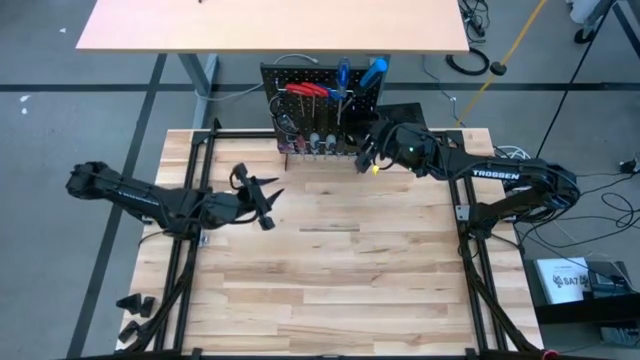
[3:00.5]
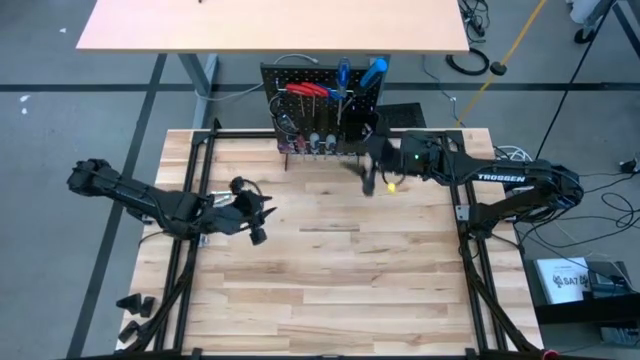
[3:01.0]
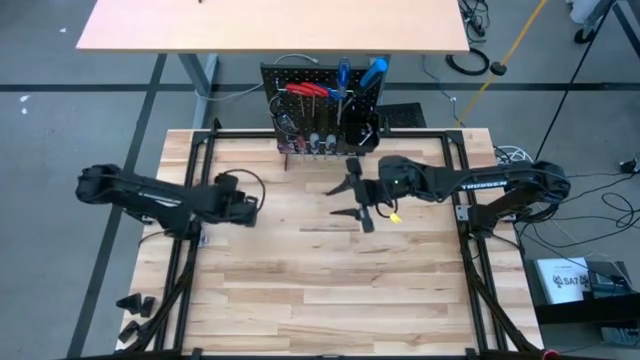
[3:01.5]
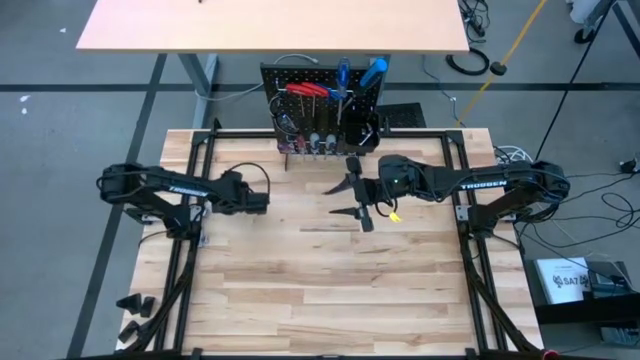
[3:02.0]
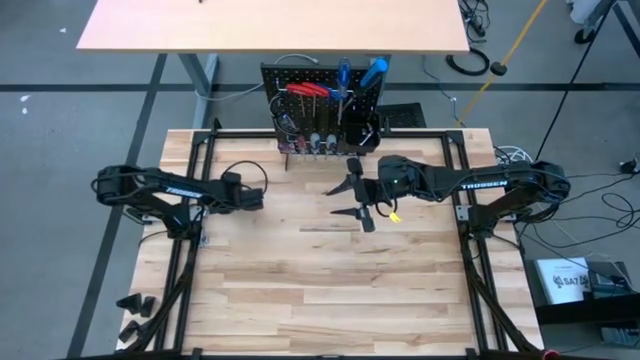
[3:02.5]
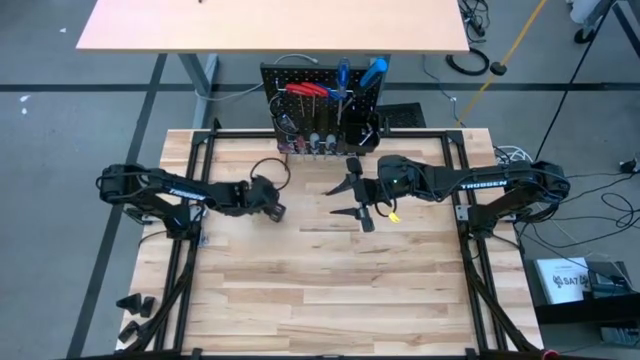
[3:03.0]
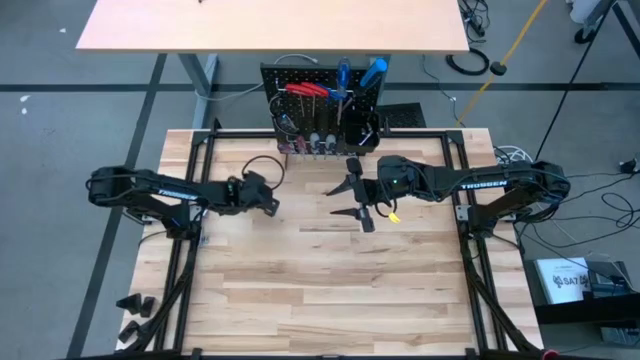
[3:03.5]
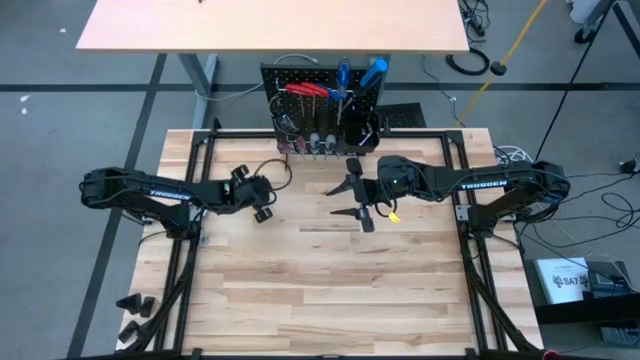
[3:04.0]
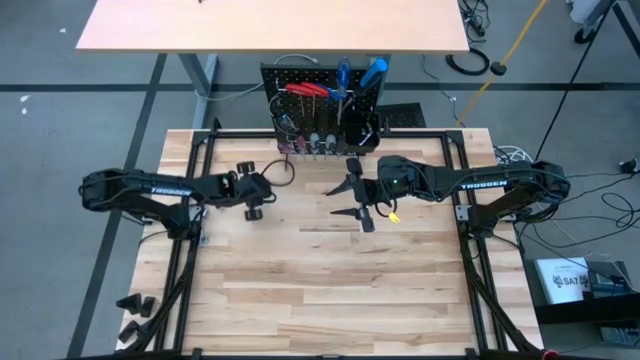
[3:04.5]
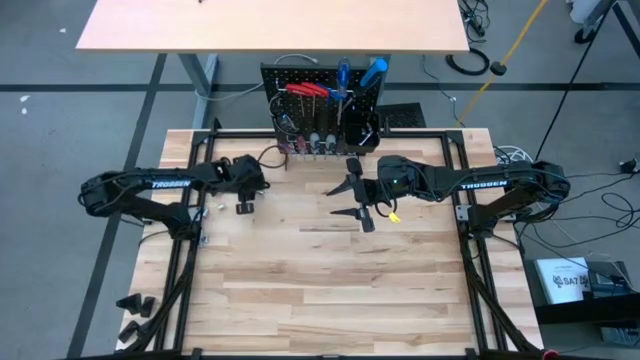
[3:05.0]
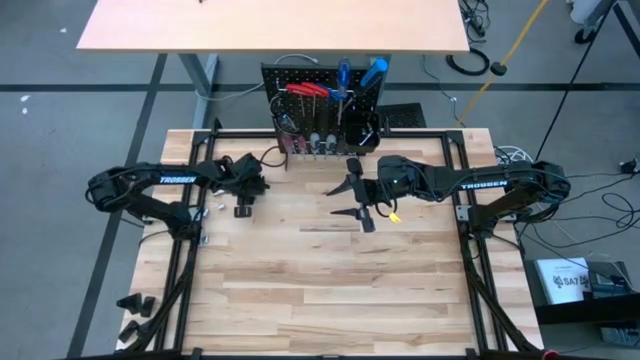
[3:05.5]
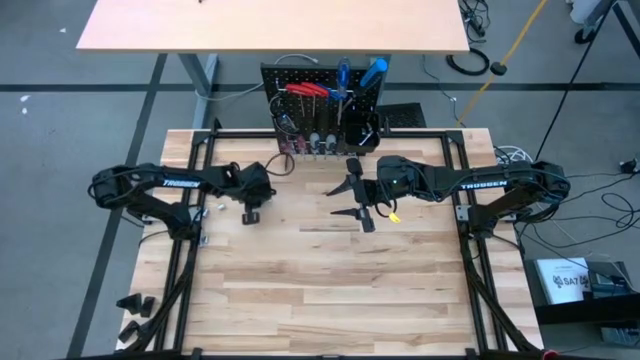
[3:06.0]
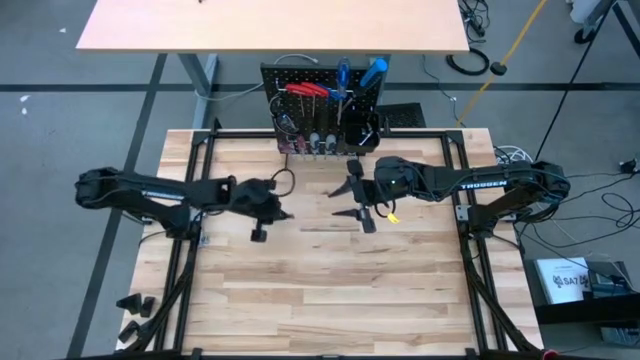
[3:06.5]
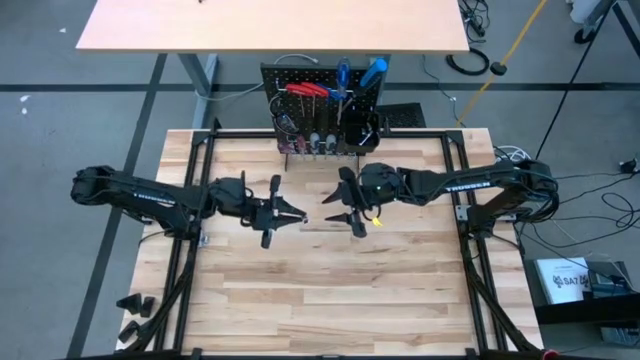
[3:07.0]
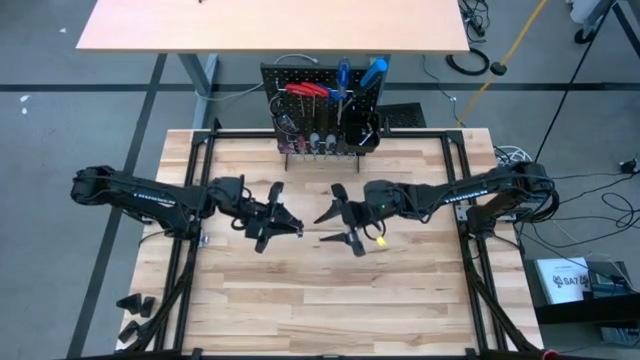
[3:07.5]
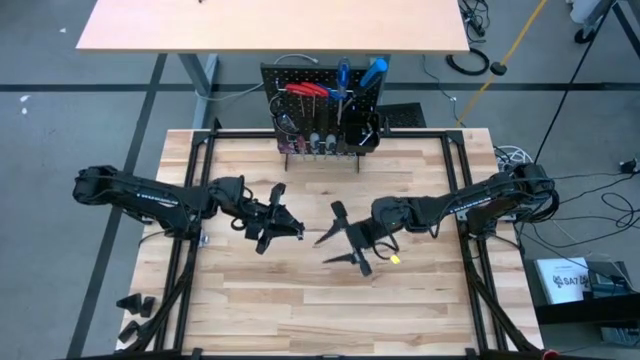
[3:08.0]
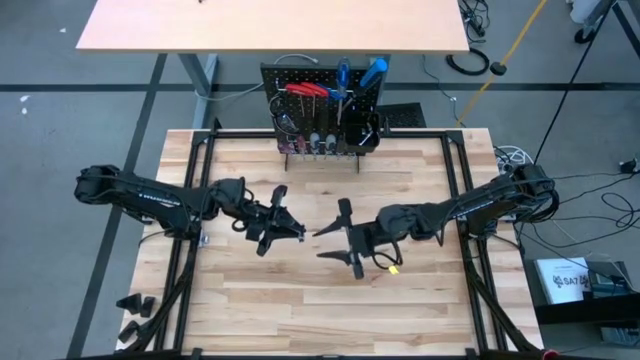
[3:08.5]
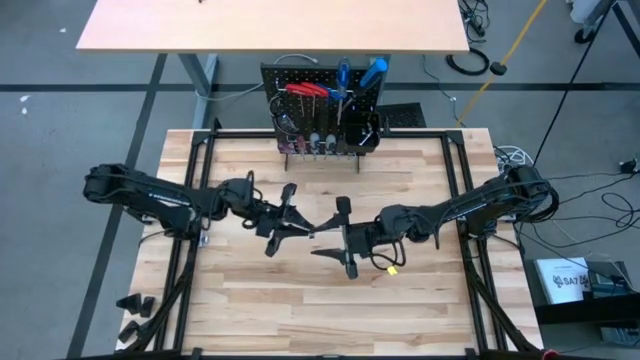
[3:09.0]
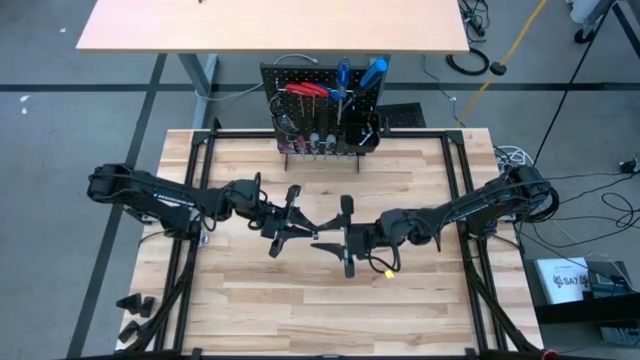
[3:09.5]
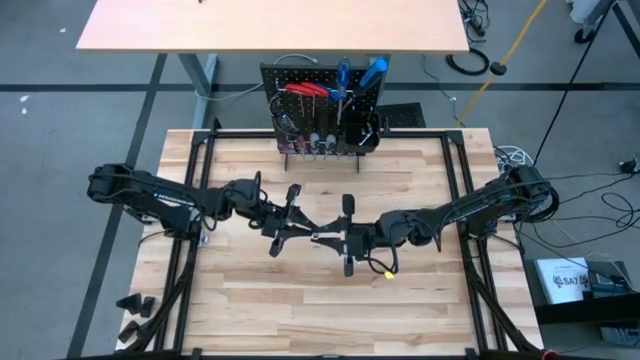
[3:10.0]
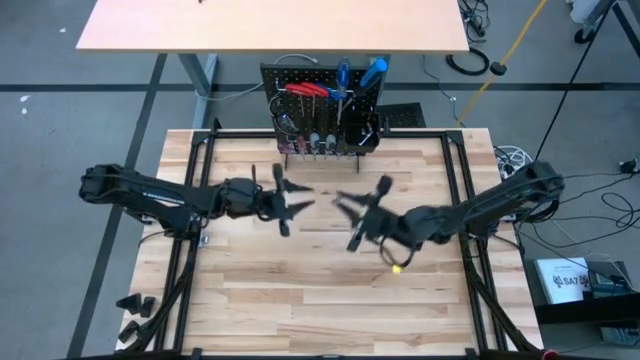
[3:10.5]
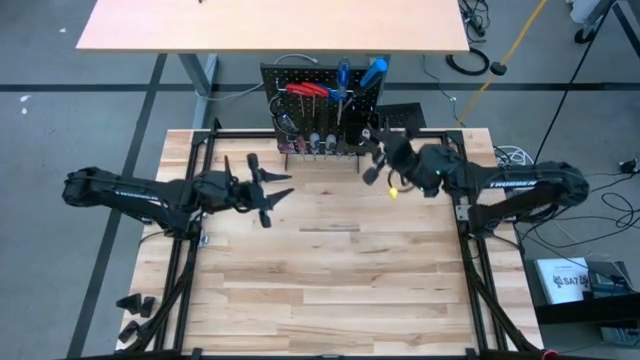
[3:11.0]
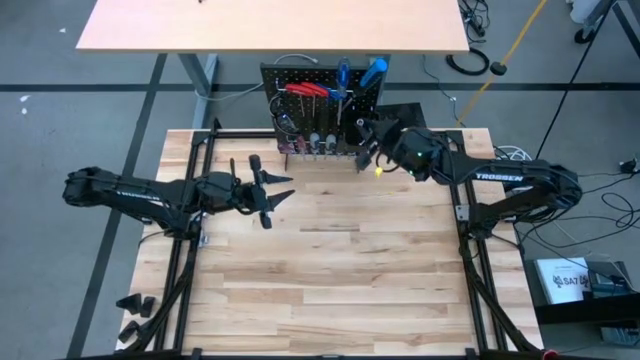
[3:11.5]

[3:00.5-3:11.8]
Task: Hang tools onto peg board
Put the extension bar into the black bin on the peg board

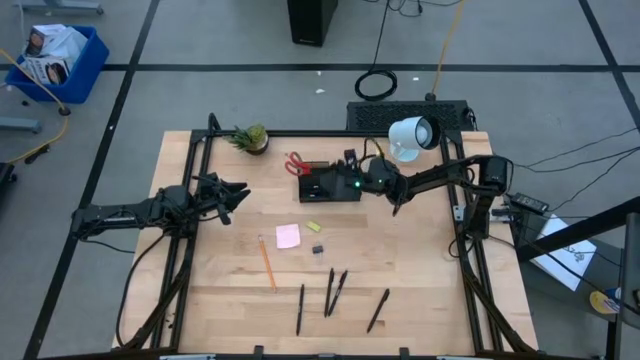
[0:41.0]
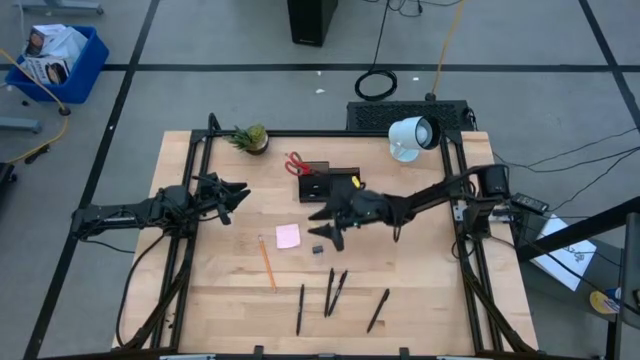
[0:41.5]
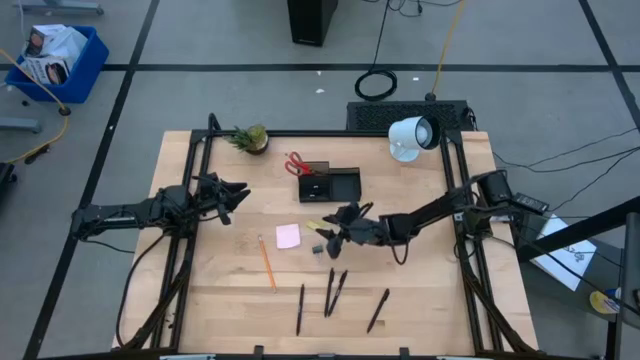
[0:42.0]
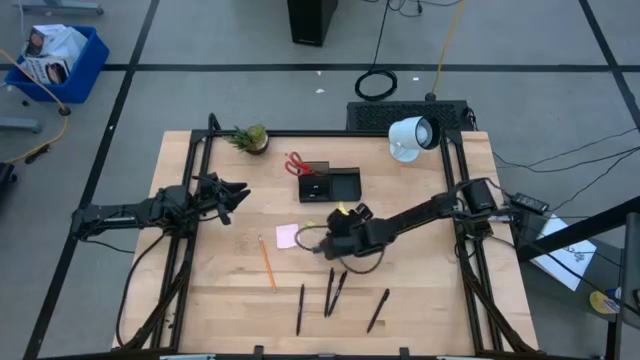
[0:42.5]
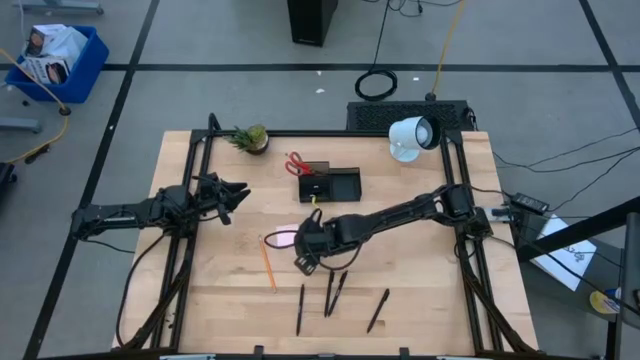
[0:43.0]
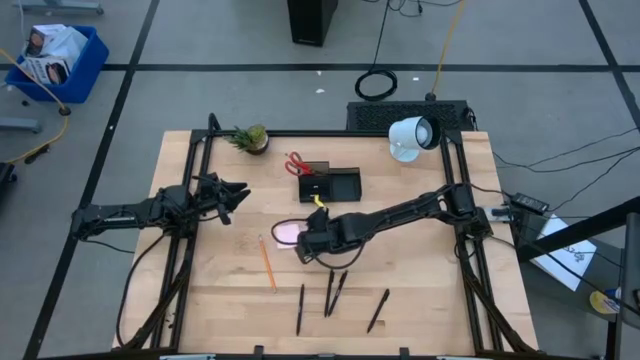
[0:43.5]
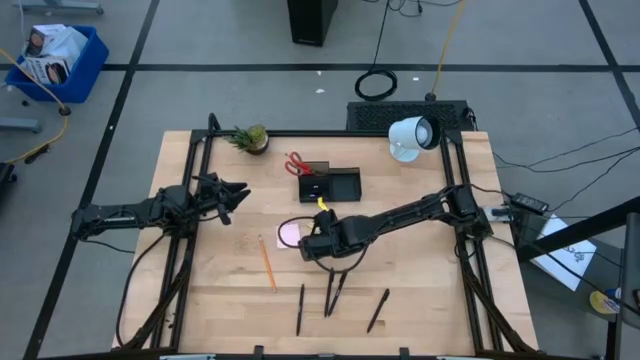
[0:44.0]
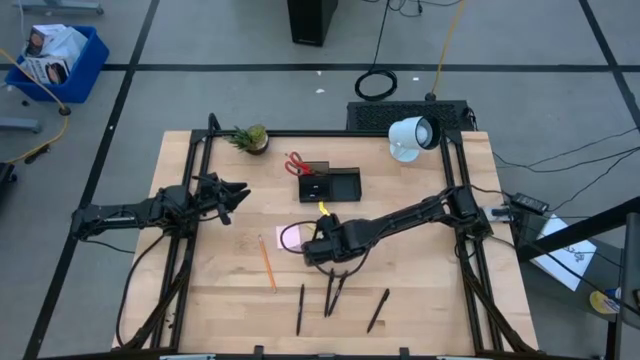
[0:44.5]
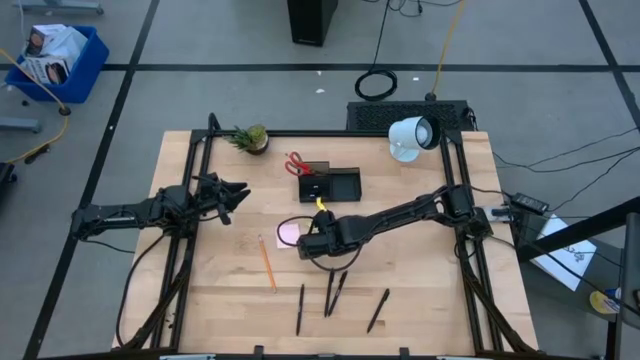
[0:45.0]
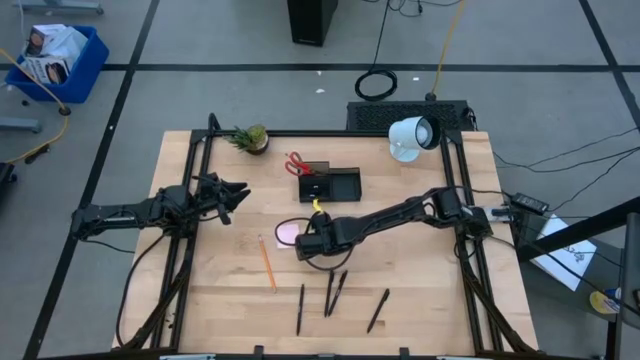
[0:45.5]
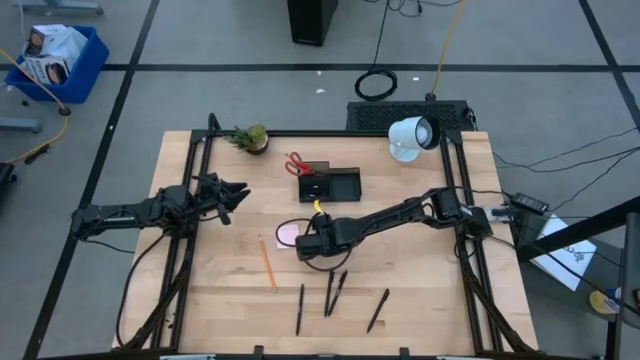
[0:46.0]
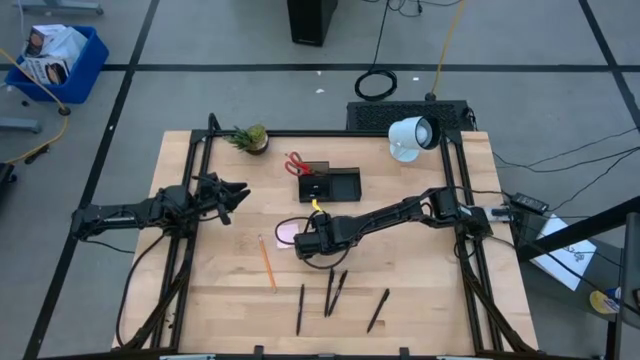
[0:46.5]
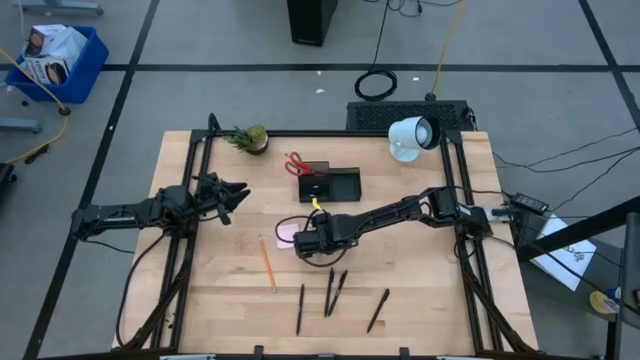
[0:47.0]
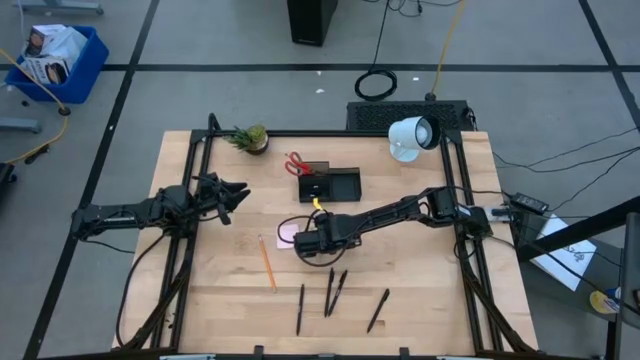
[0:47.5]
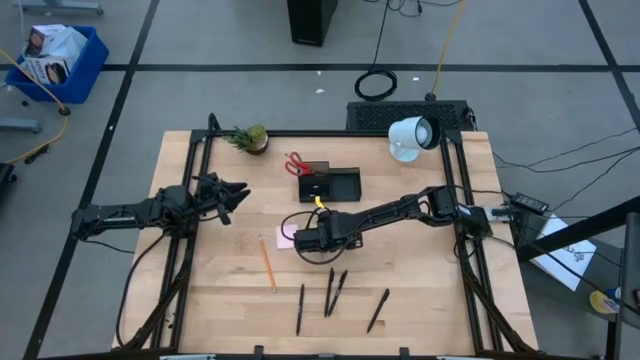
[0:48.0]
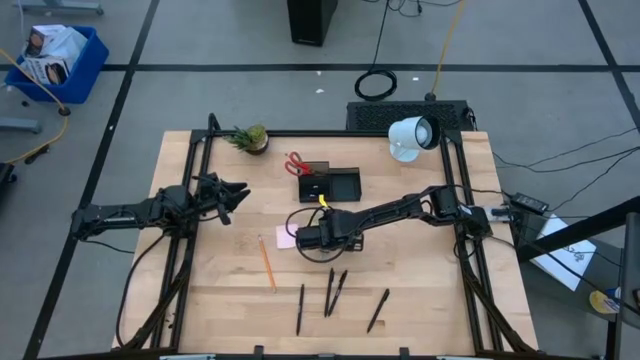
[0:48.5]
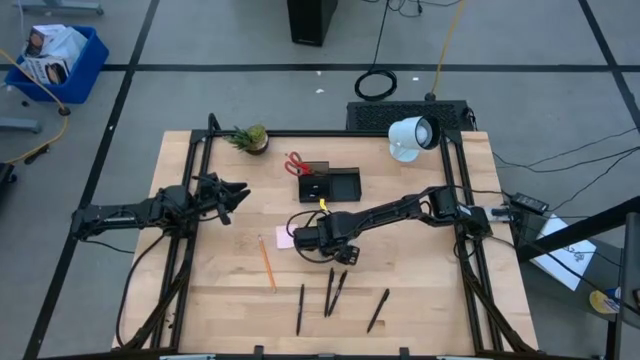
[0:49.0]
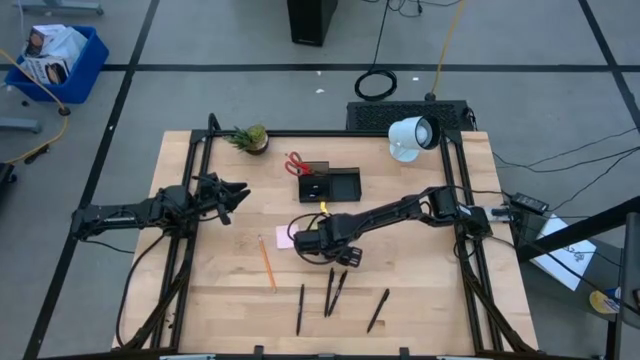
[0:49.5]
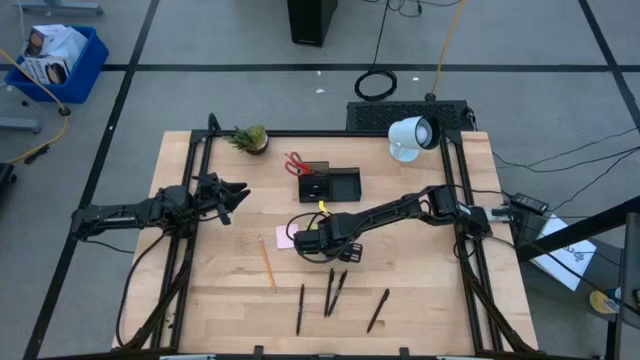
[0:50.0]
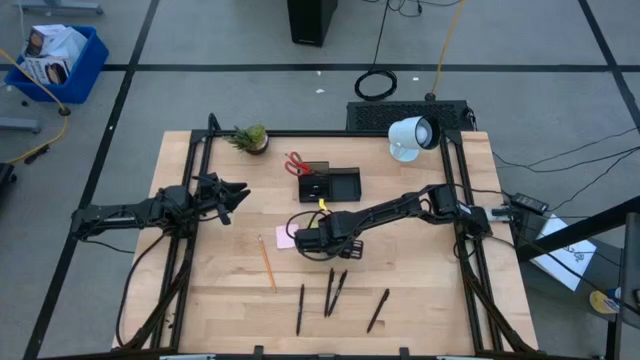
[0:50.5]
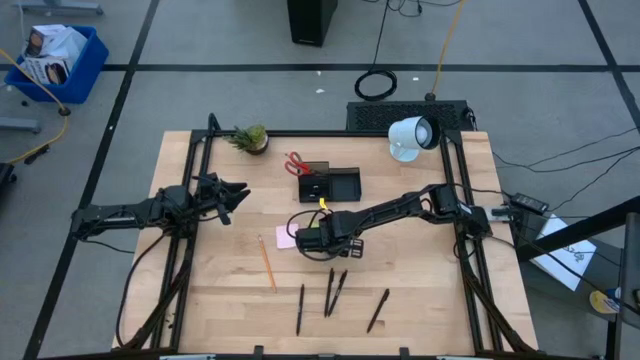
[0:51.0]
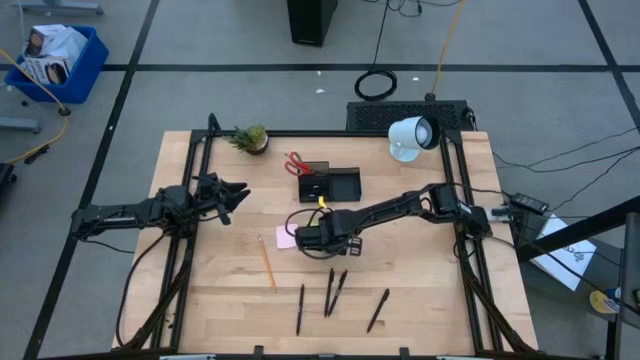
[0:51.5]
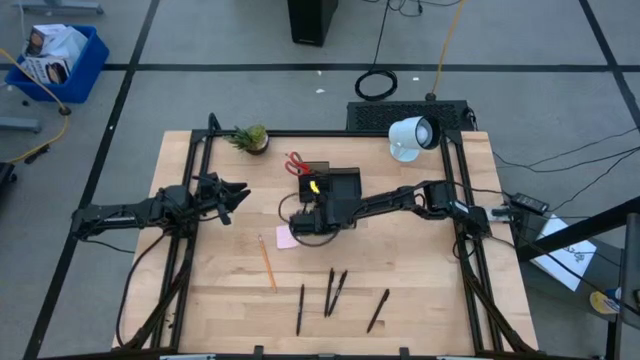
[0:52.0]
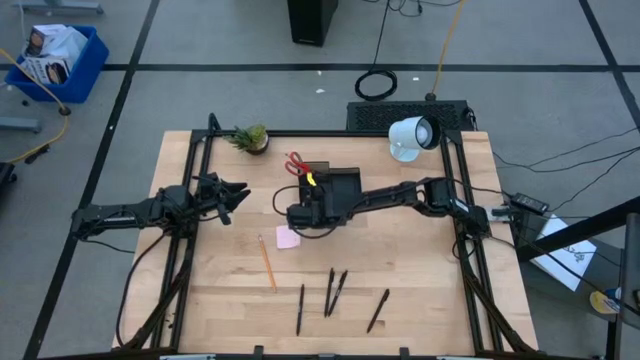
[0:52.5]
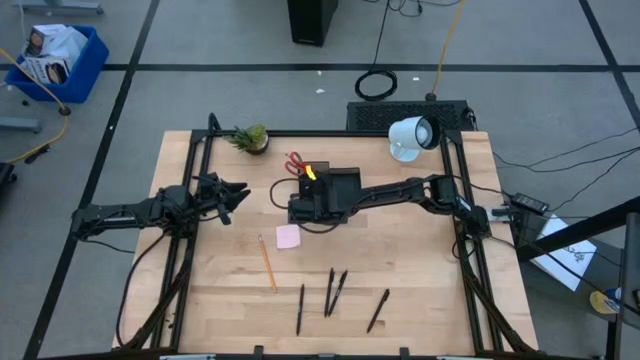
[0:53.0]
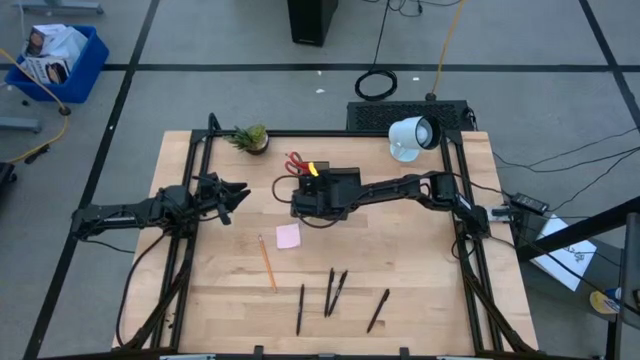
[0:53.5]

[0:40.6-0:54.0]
Task: Pick and place office supplies into organizer
Put the binder clip into the mesh organizer
